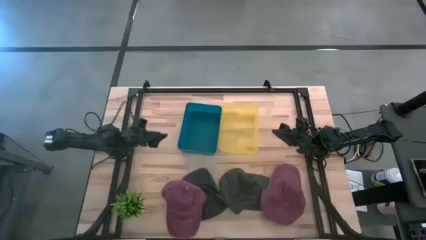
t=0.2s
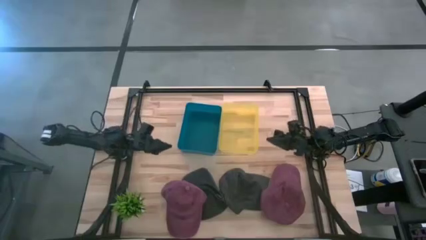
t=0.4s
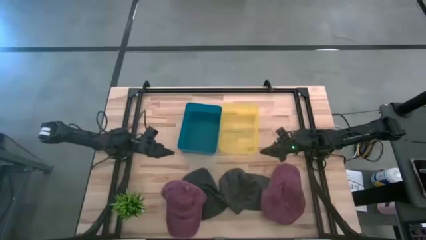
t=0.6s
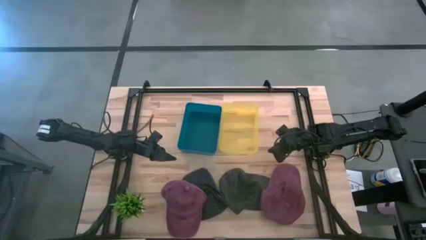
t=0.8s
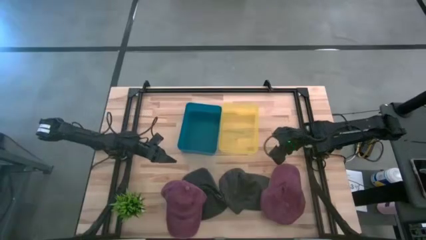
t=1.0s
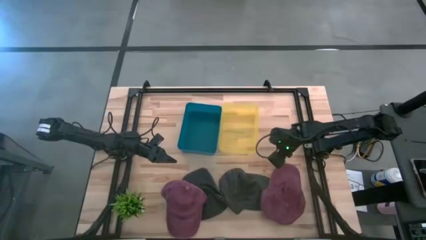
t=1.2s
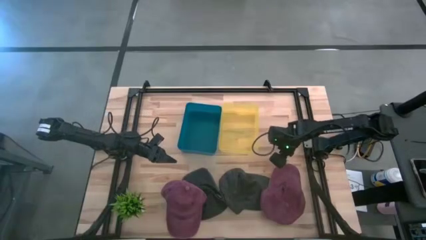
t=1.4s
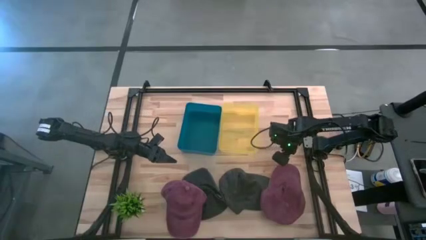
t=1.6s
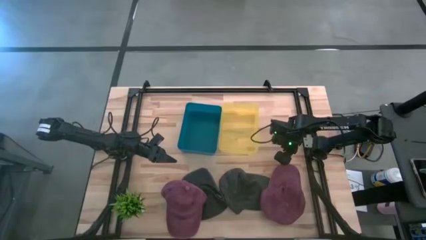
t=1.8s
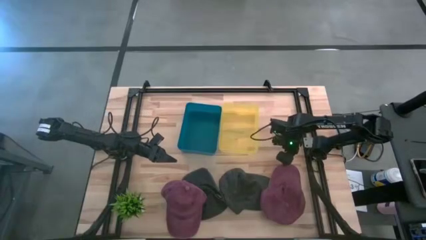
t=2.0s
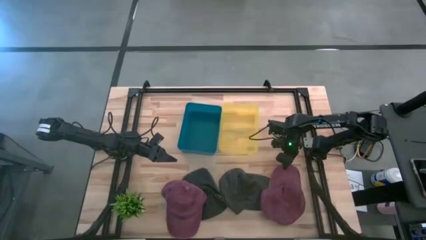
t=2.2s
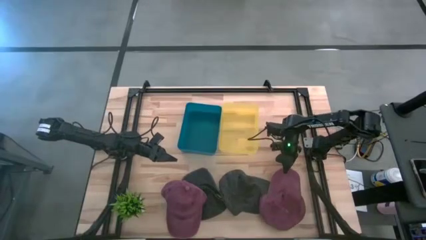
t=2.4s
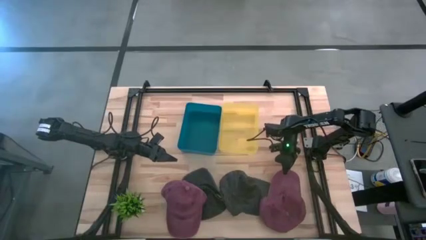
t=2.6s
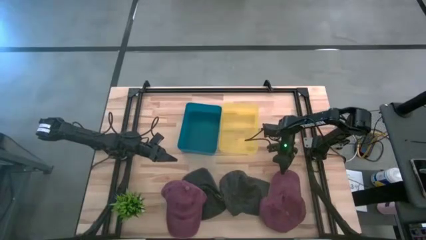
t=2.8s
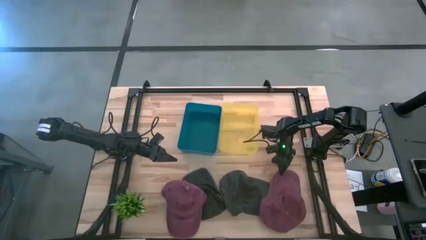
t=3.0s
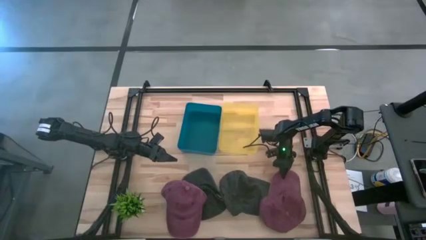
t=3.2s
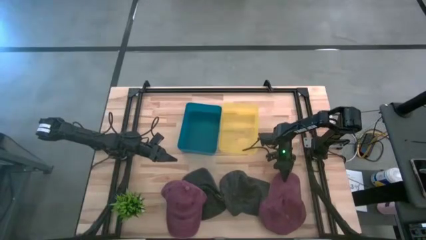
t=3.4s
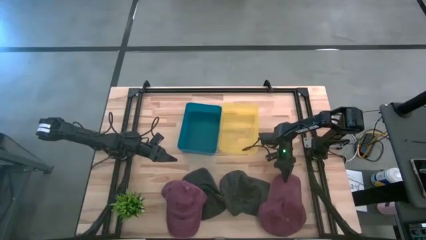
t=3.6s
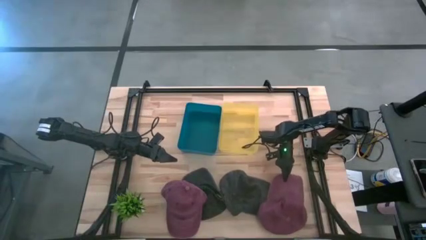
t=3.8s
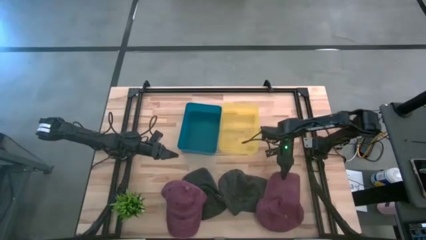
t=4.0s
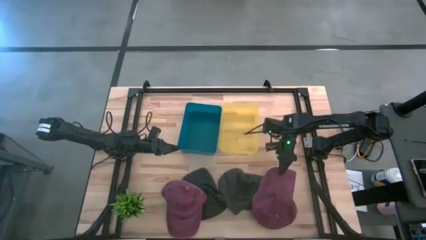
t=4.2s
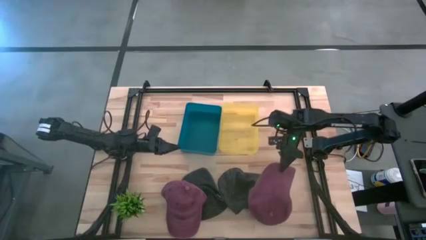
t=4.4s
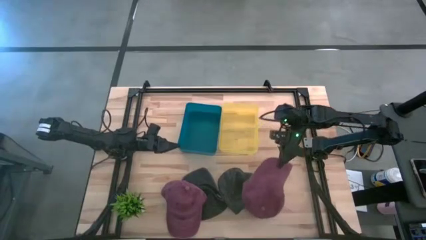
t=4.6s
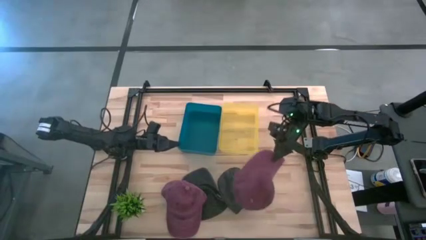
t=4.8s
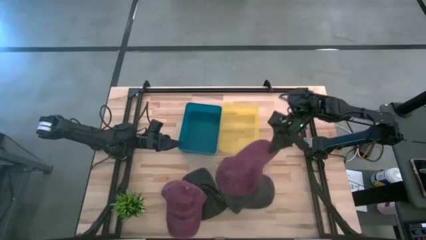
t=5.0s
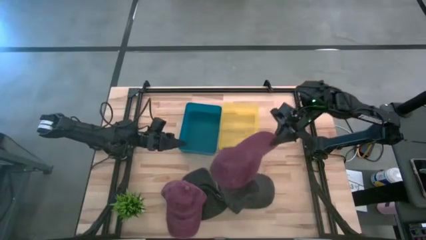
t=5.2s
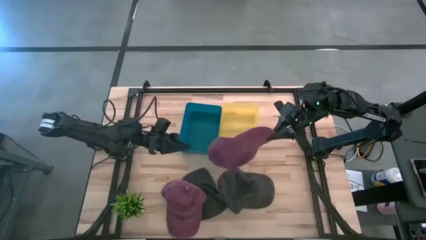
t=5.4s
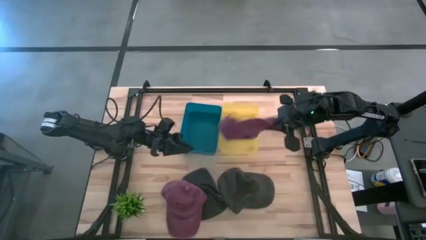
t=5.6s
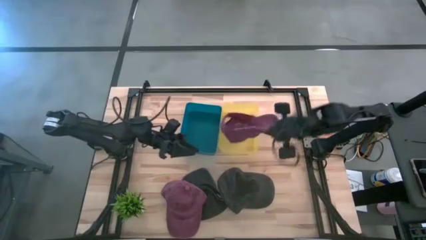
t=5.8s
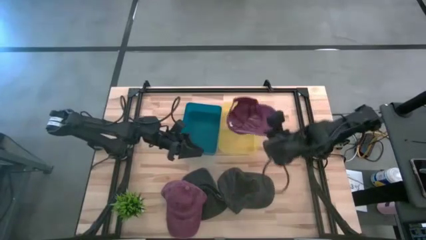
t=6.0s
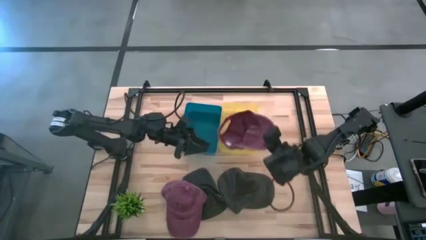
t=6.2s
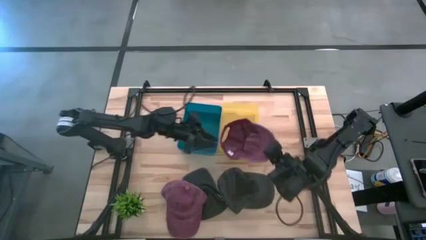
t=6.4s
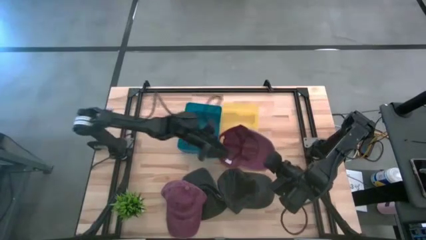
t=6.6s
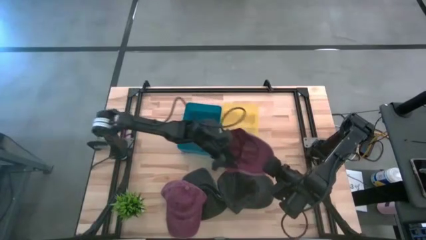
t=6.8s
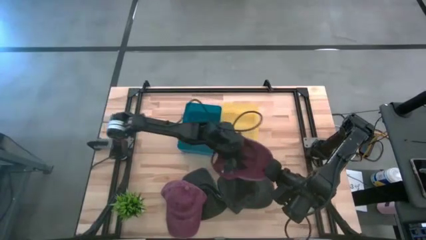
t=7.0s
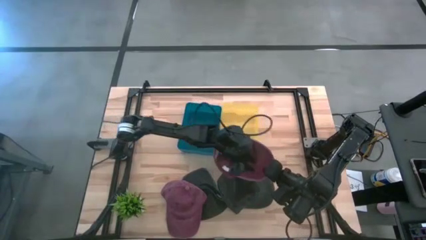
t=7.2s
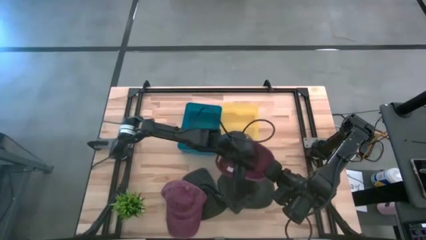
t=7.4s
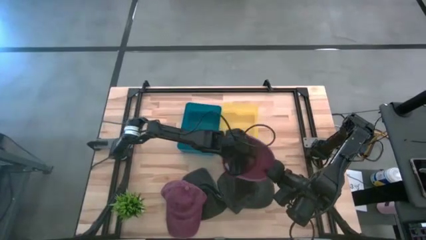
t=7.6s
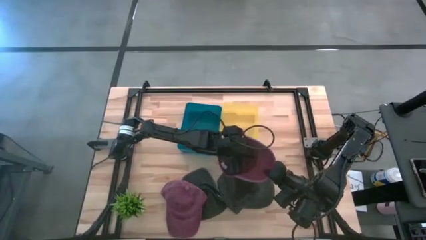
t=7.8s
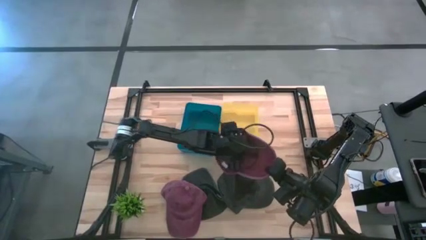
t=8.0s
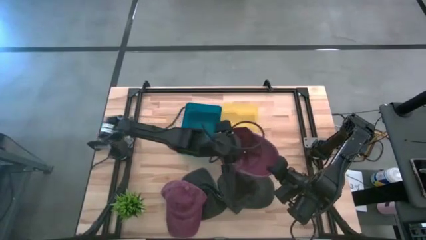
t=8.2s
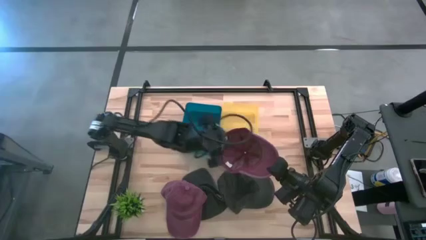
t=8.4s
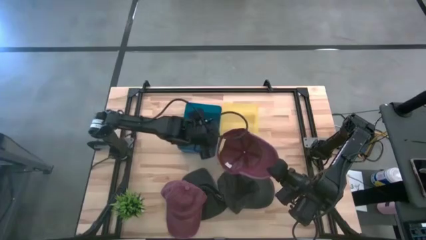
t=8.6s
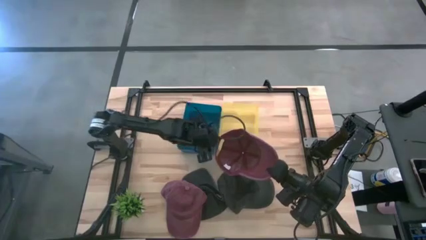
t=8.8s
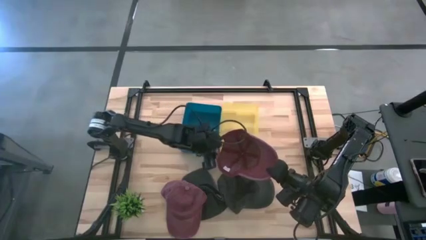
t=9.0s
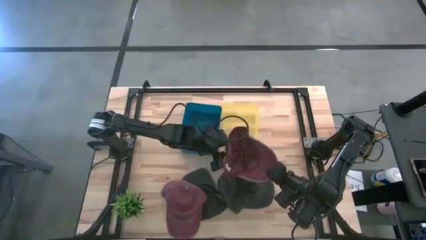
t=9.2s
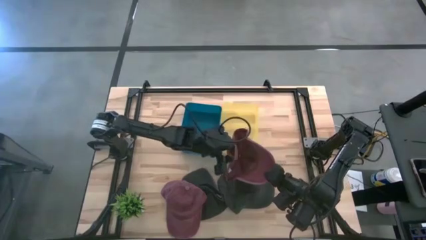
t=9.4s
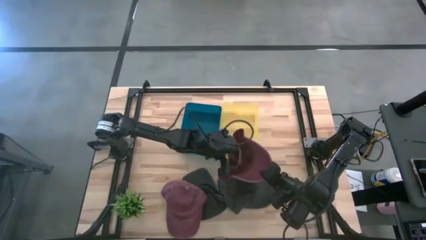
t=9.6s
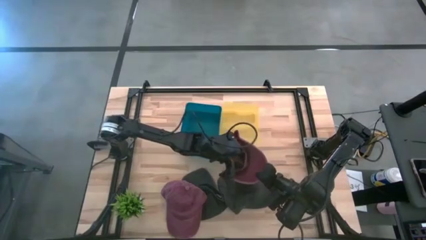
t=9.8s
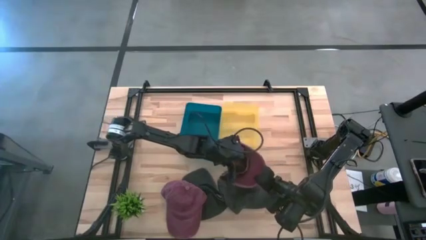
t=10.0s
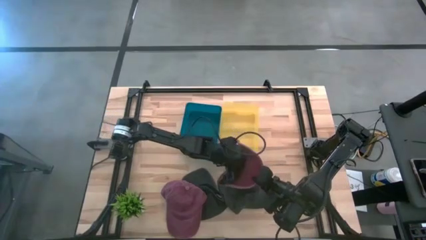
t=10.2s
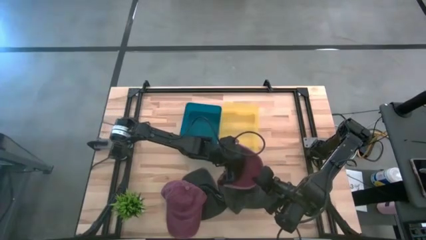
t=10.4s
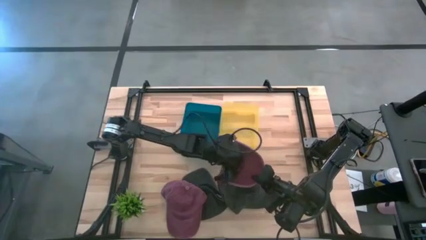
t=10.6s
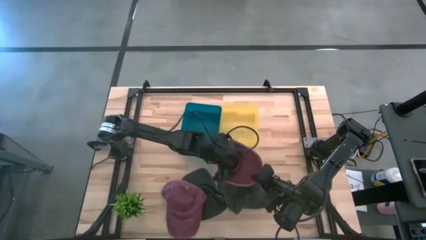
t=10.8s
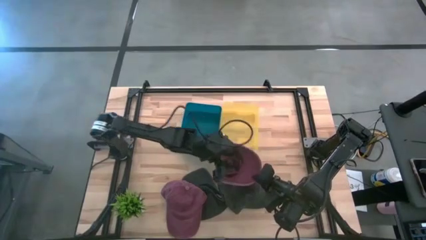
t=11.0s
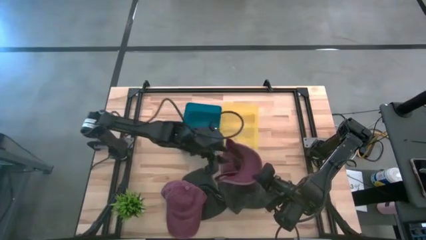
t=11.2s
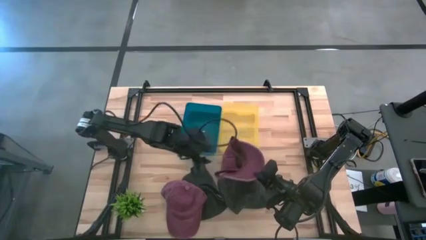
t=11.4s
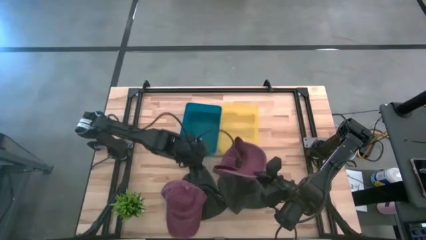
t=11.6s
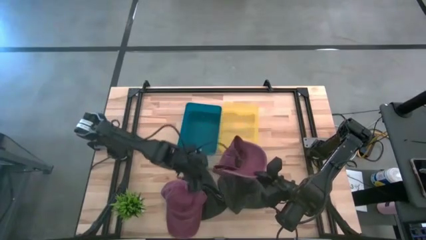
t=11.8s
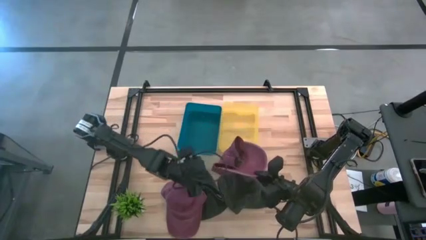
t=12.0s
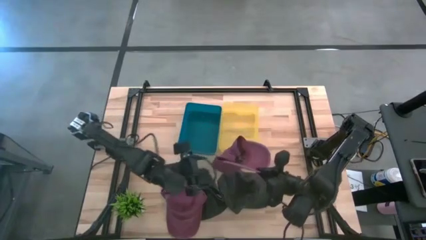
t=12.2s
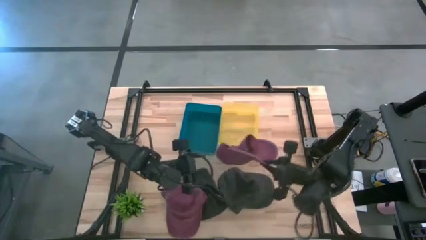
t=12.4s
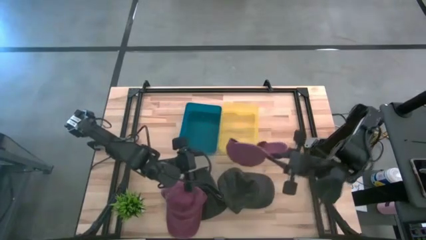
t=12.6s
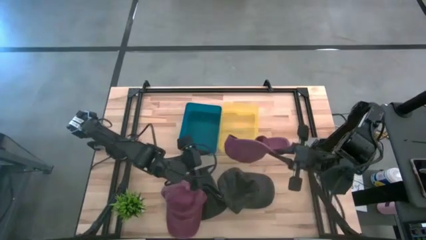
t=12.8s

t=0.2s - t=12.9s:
Task: Pick & Place hat
Put the right red cap into the yellow bin
